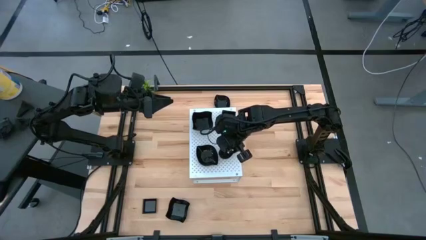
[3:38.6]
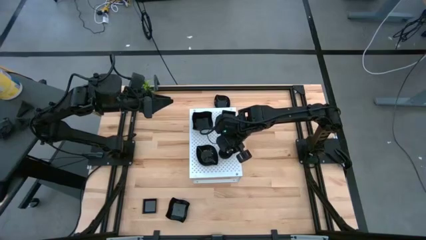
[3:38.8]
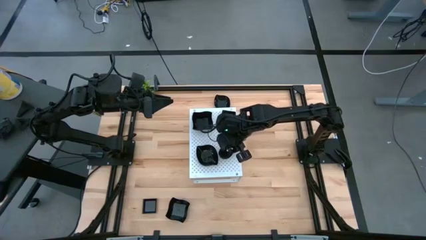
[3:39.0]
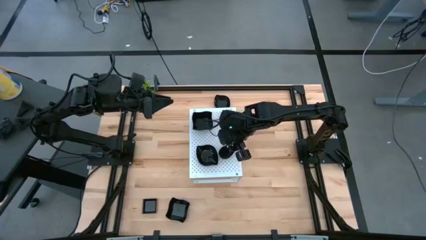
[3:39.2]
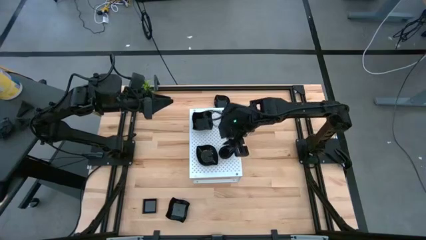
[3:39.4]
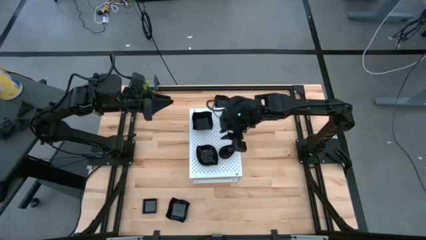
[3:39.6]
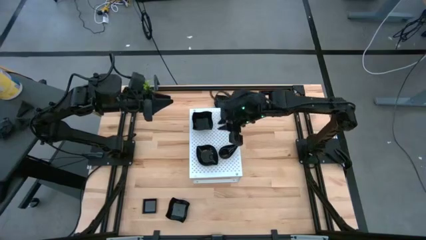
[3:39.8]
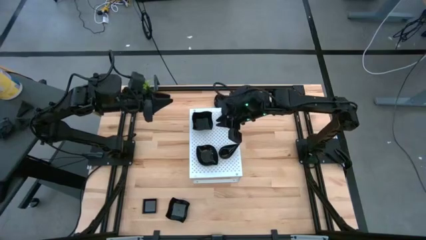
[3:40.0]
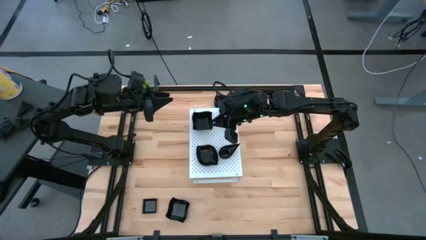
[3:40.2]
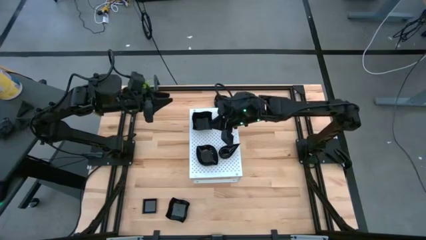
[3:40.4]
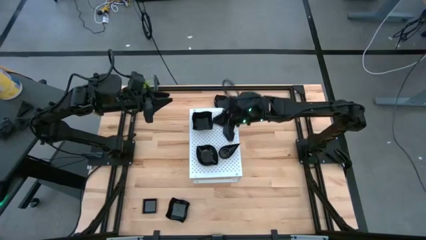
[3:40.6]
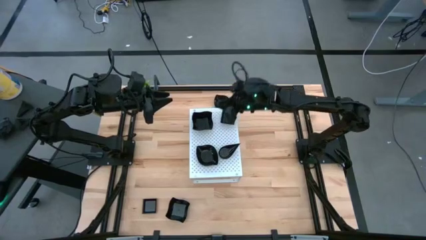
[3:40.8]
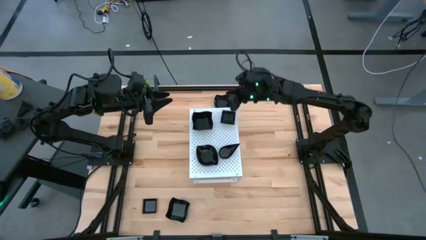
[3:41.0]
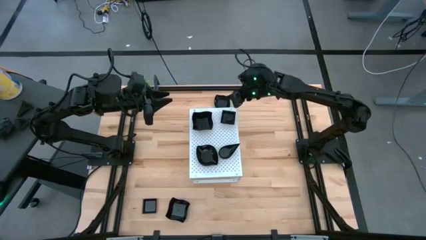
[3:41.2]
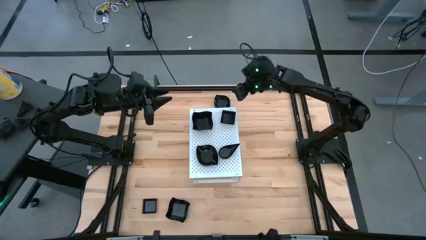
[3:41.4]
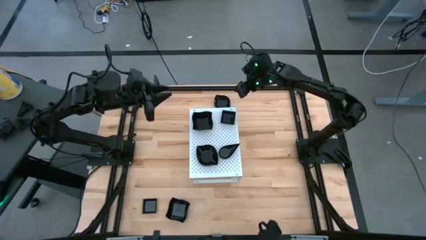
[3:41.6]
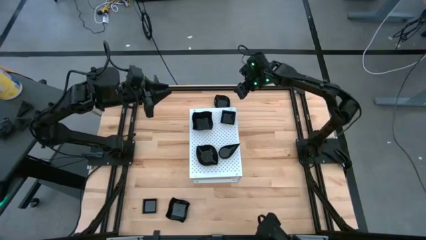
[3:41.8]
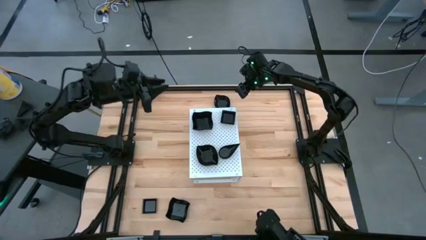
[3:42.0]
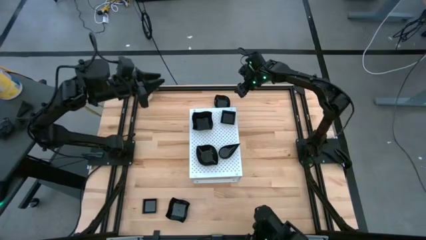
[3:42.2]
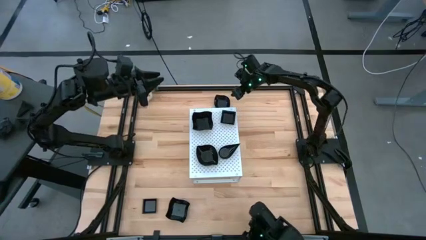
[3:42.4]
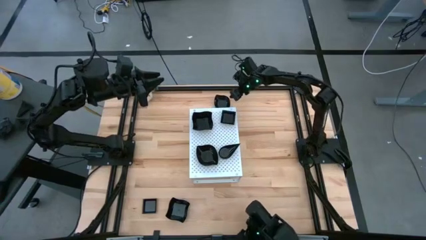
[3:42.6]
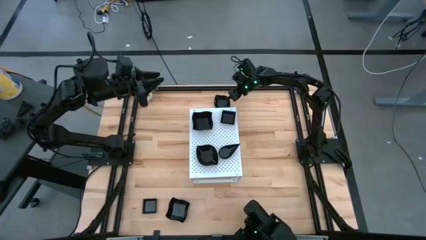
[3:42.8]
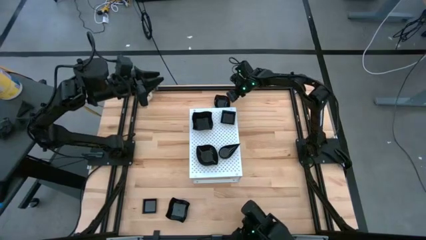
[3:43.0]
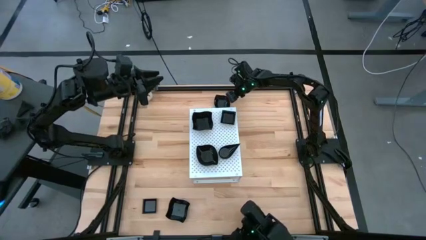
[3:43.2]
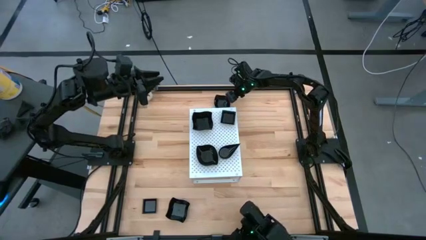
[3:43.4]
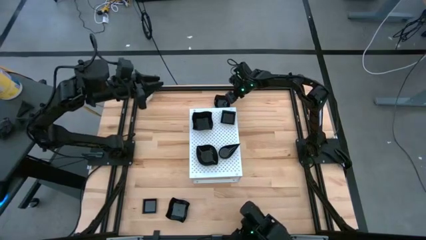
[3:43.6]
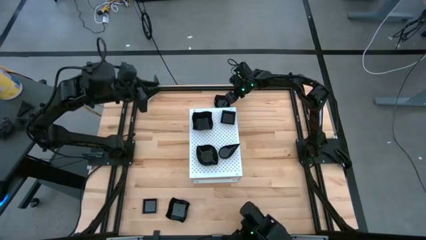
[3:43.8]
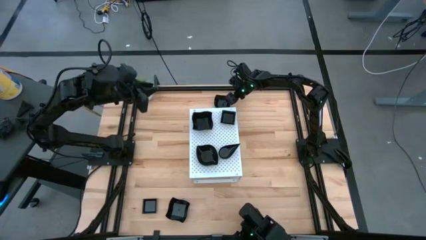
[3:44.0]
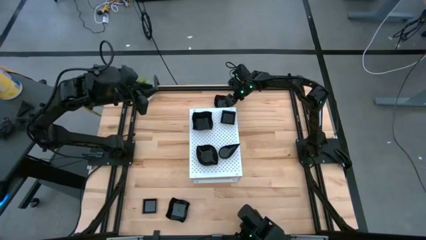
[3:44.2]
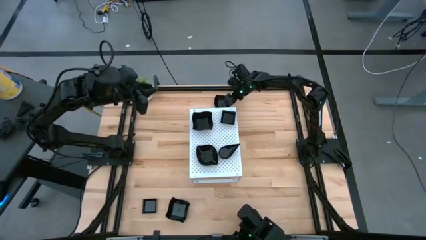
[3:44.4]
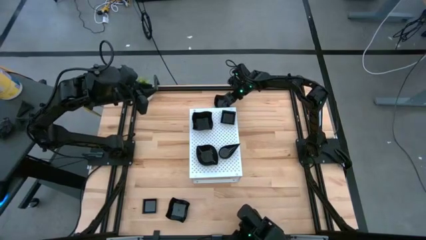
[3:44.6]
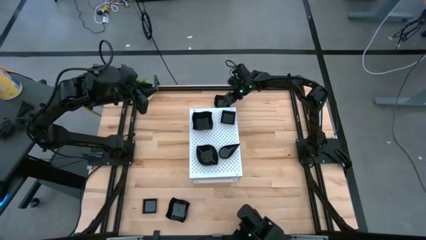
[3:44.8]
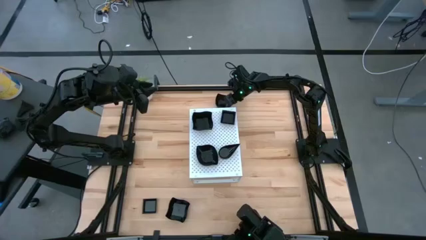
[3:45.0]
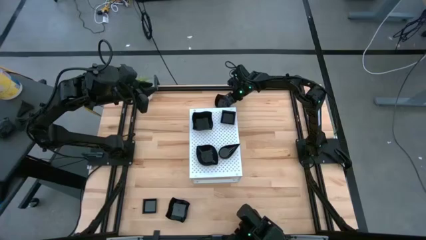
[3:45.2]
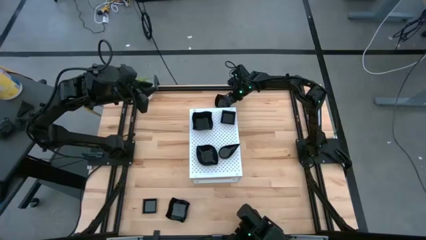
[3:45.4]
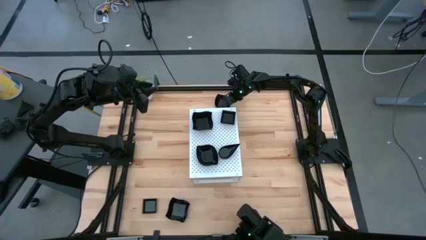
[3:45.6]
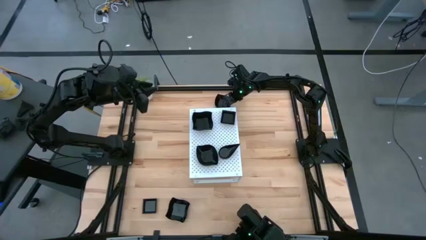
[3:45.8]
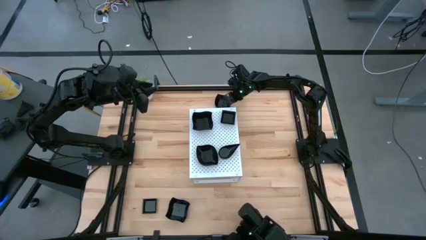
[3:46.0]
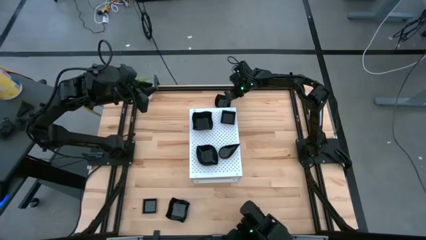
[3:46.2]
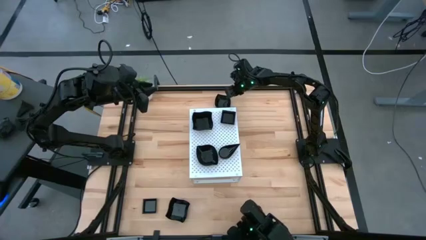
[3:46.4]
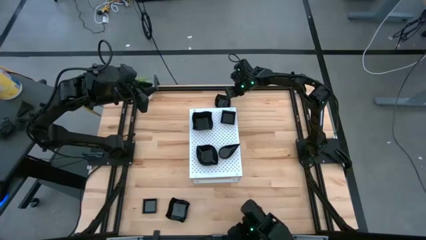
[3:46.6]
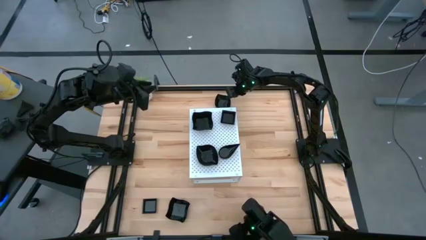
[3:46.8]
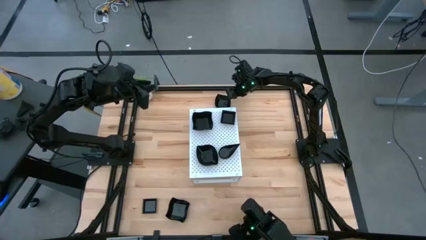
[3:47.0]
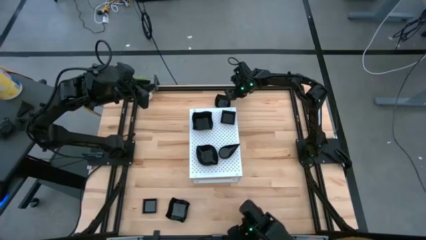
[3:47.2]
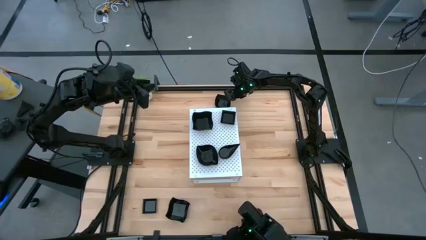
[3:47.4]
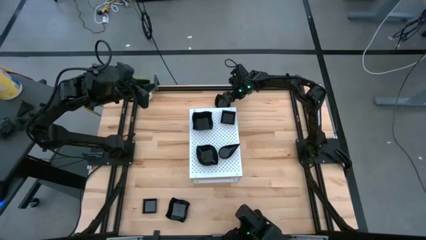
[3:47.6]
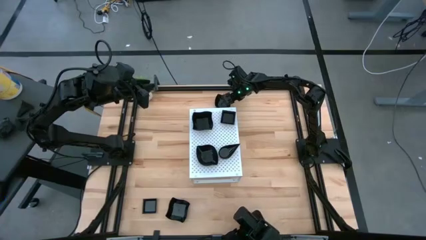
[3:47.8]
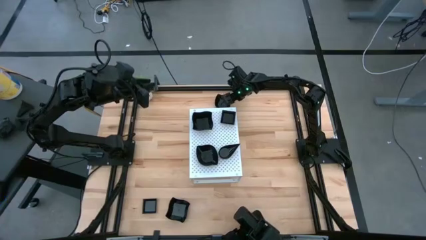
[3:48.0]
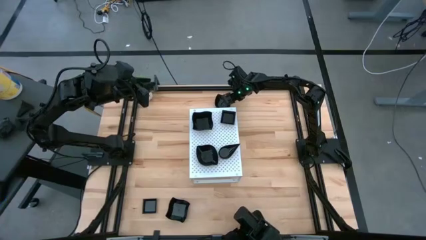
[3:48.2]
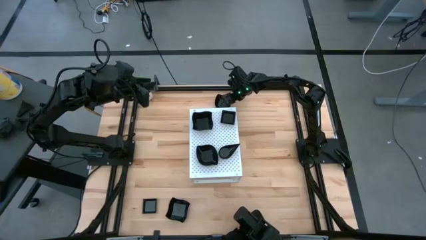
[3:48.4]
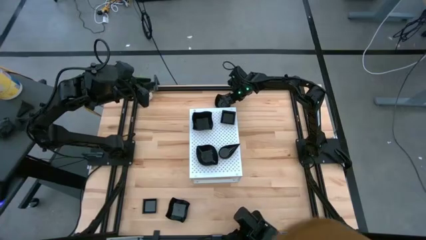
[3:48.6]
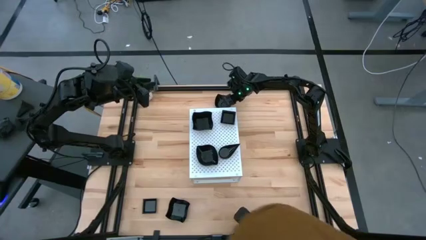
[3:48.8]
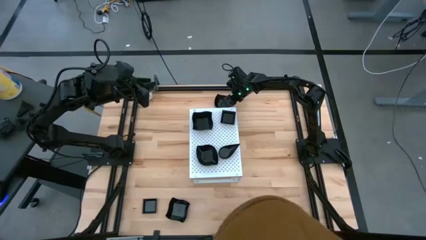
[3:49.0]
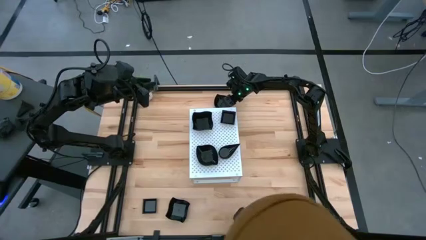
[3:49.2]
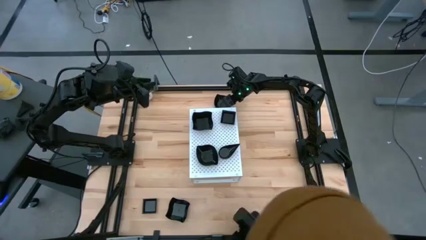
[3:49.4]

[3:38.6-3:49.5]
Task: Pick & Place Mini shaped plates
Stack the black leaf shaped plate on top of the other black leaf shaped plate on the shelf
